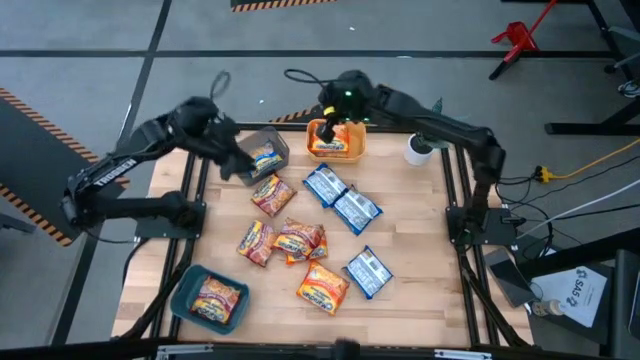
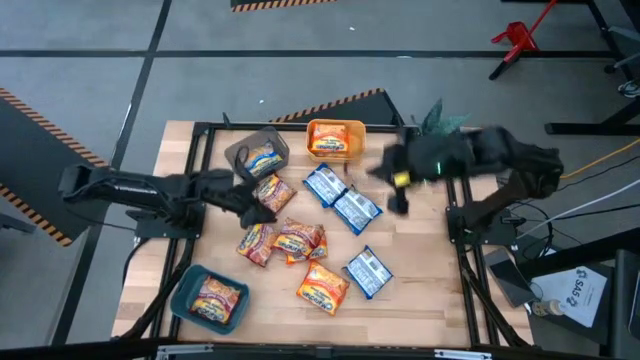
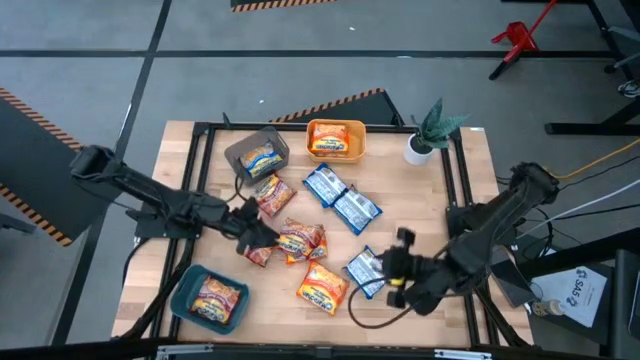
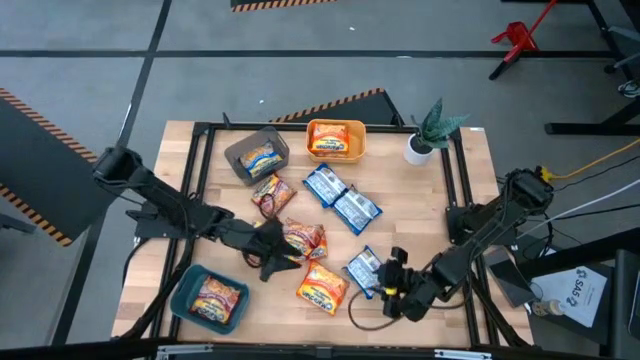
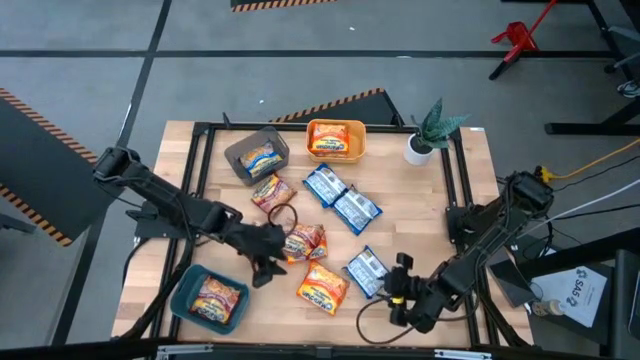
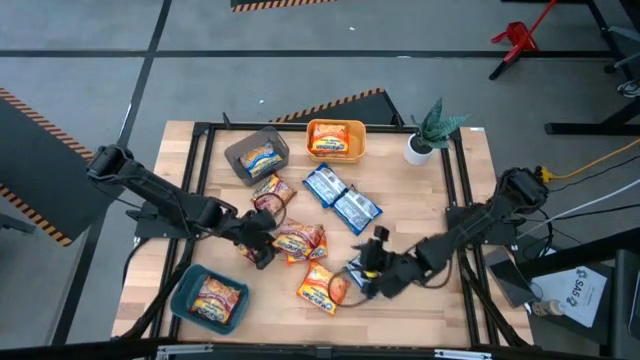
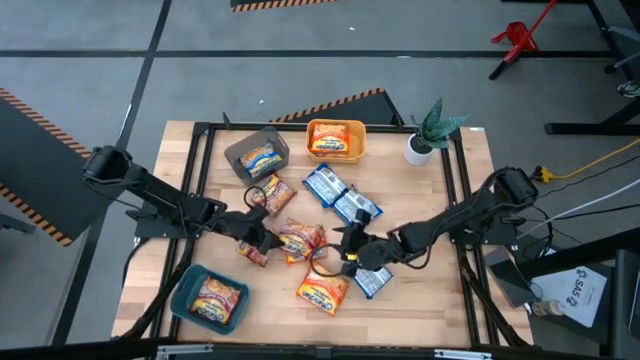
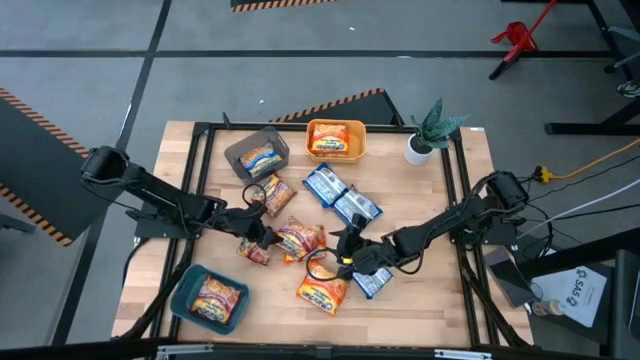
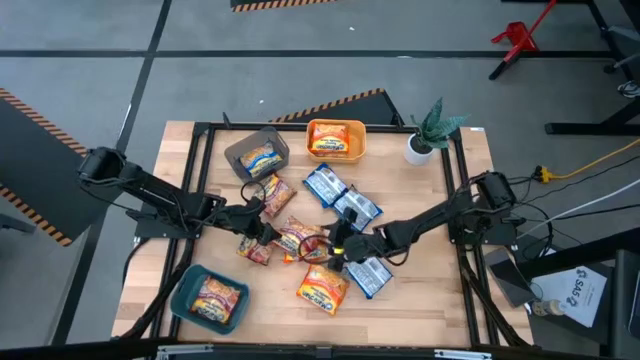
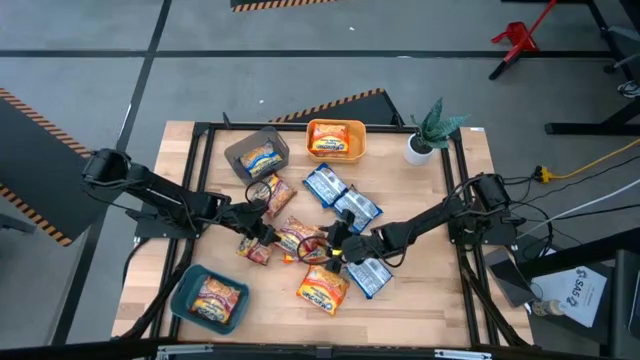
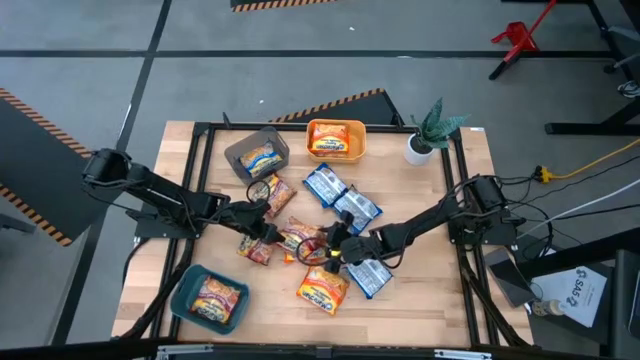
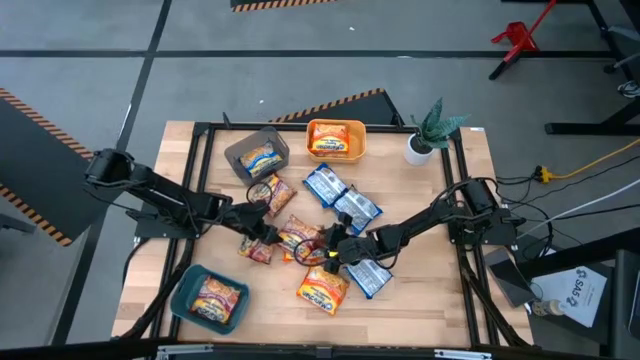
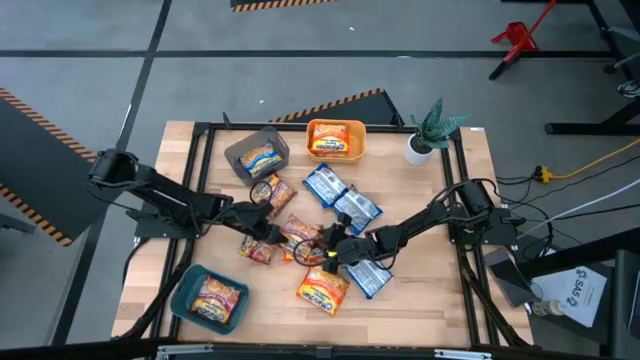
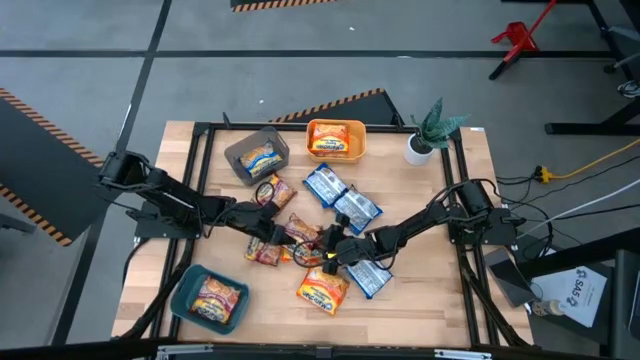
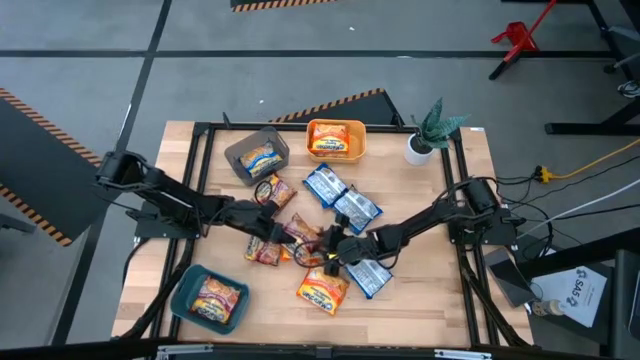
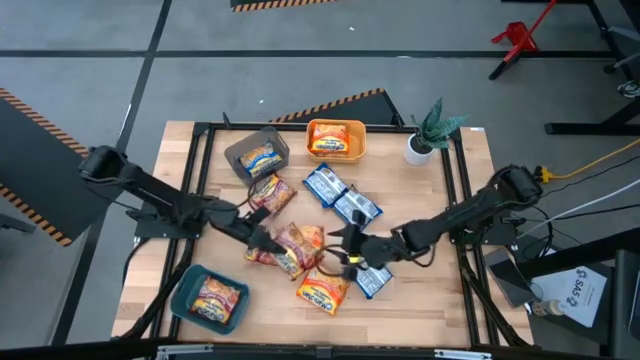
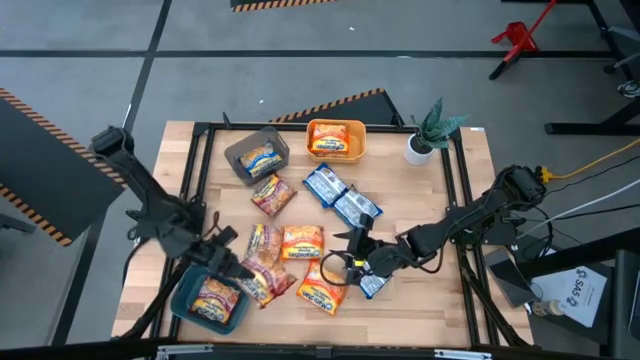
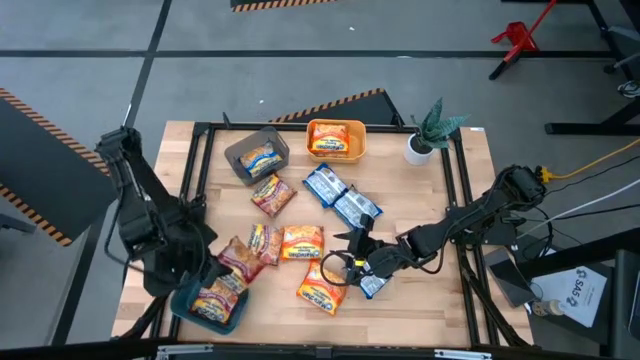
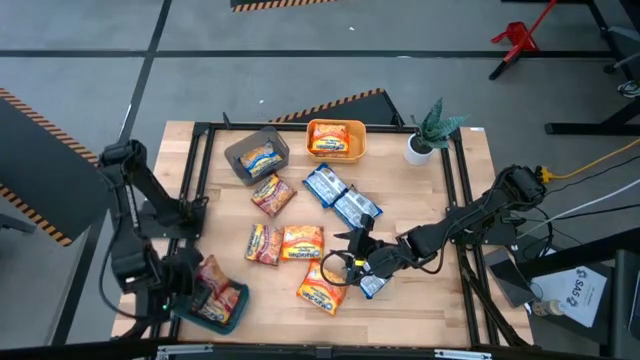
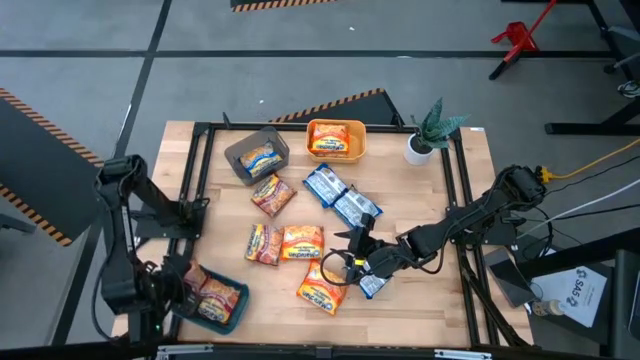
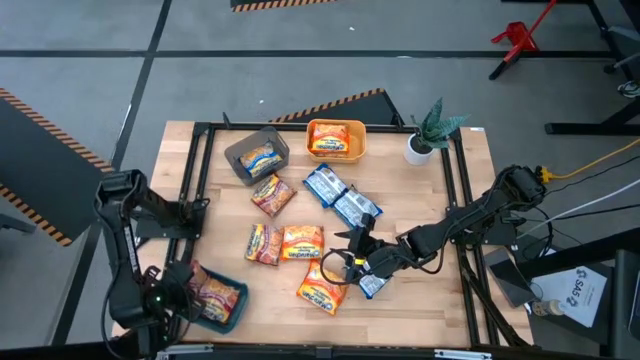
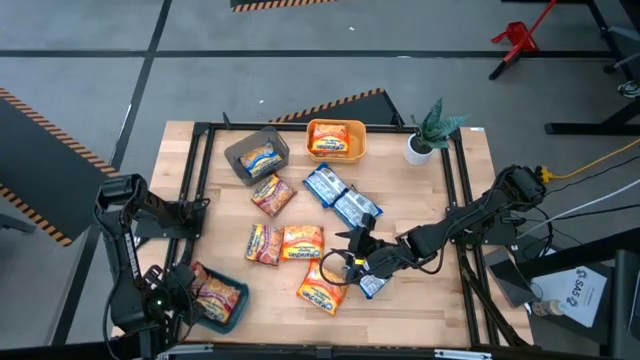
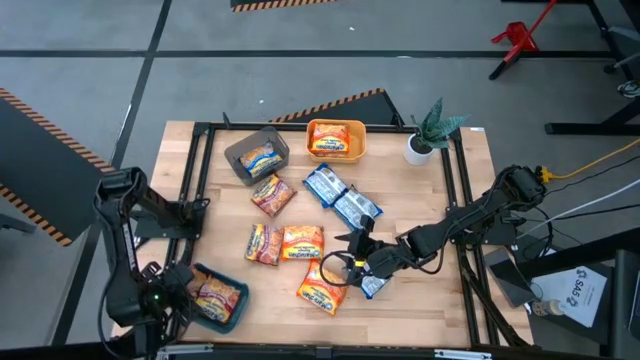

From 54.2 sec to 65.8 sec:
Task: Sort Maruchan noodles
Put the pack of red ramen noodle soup into the teal blue bin

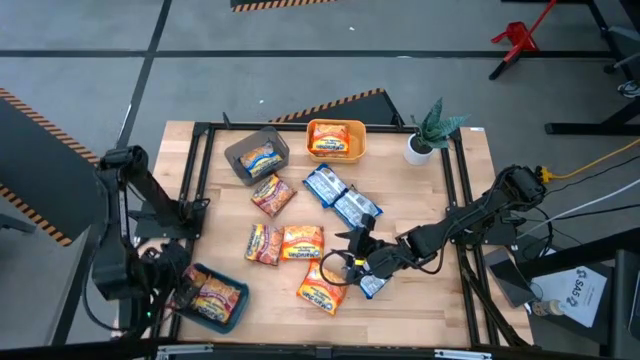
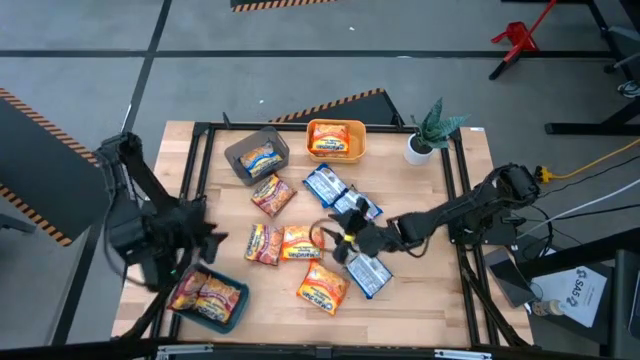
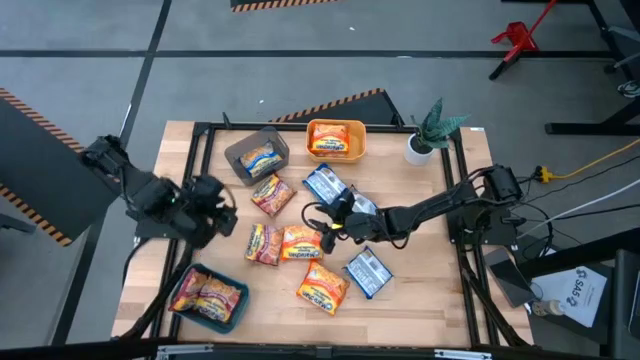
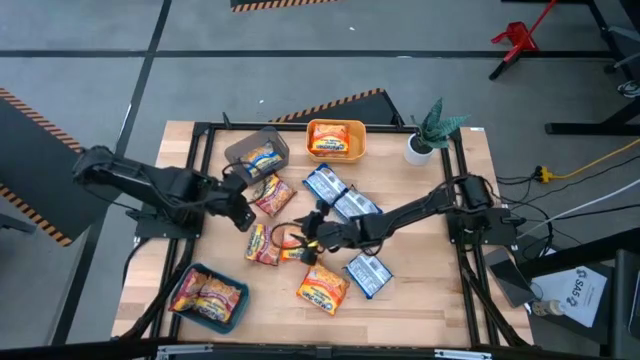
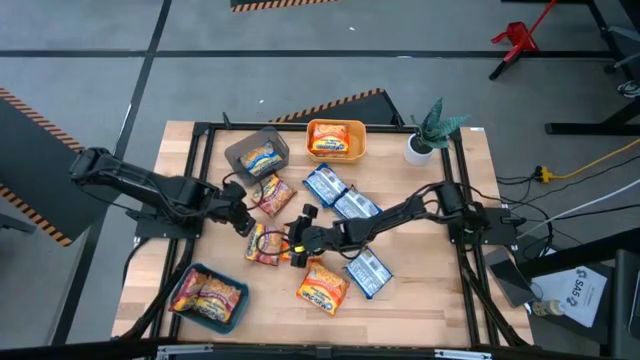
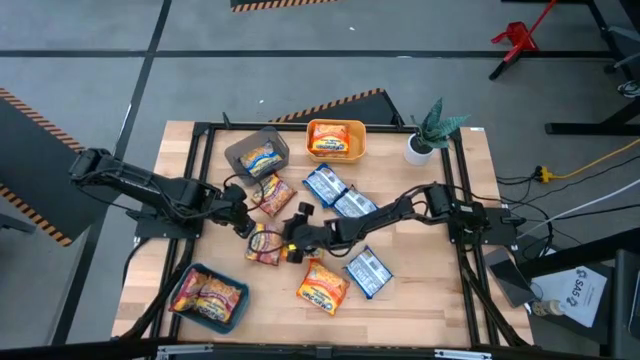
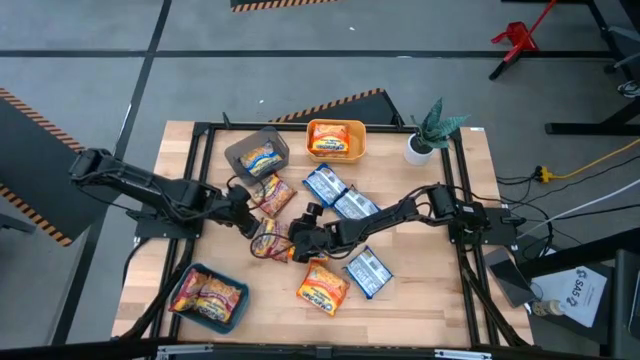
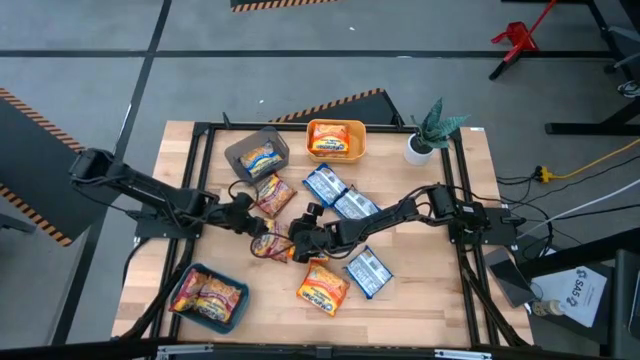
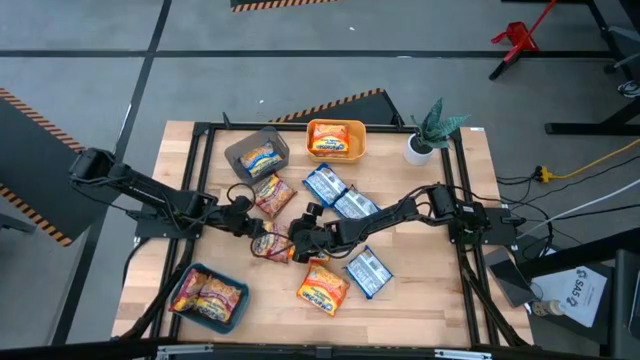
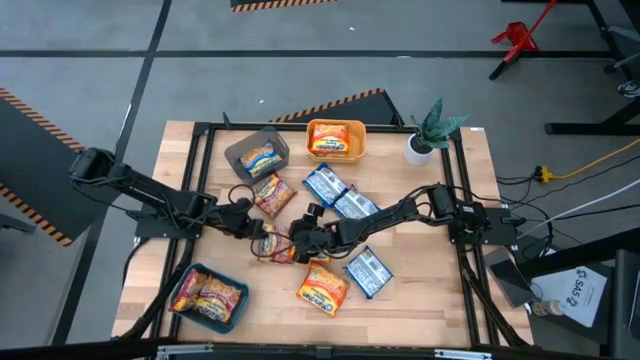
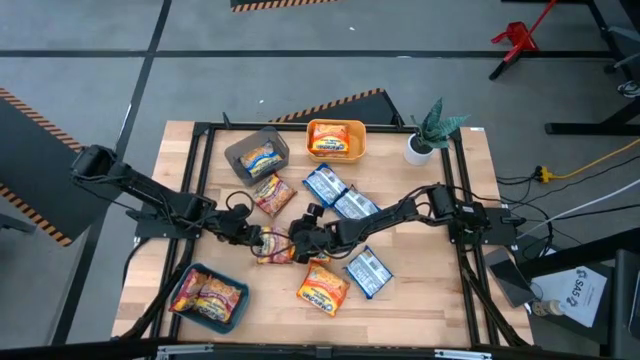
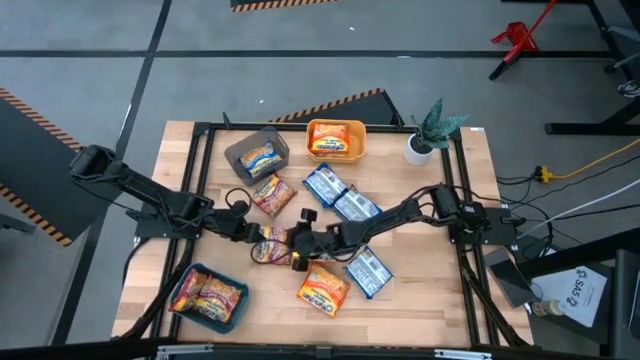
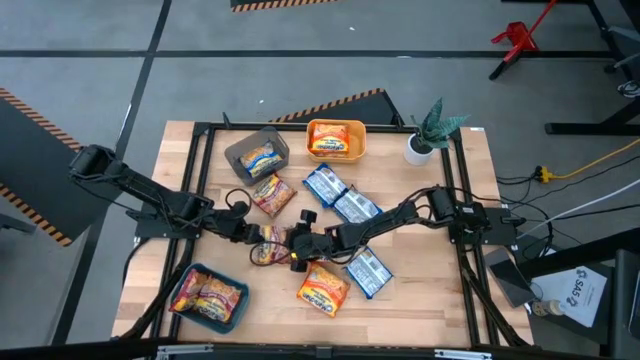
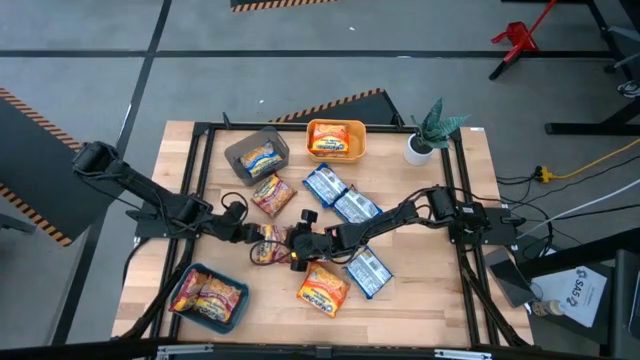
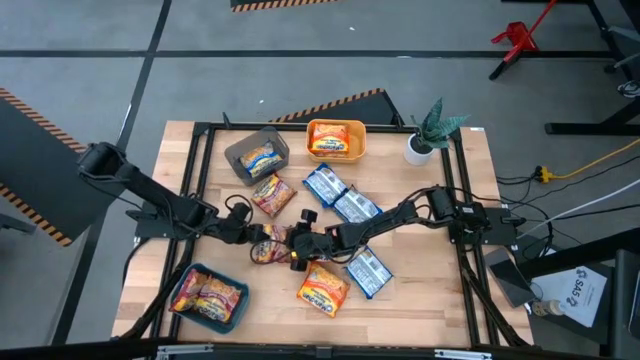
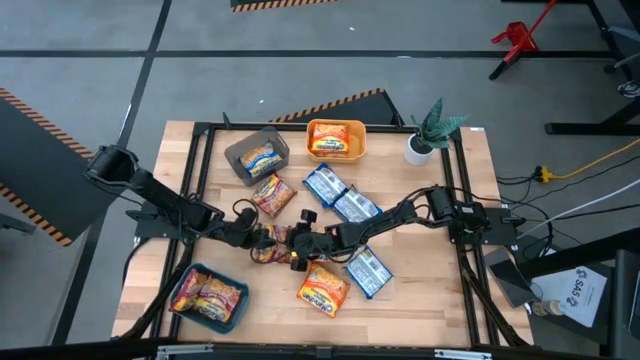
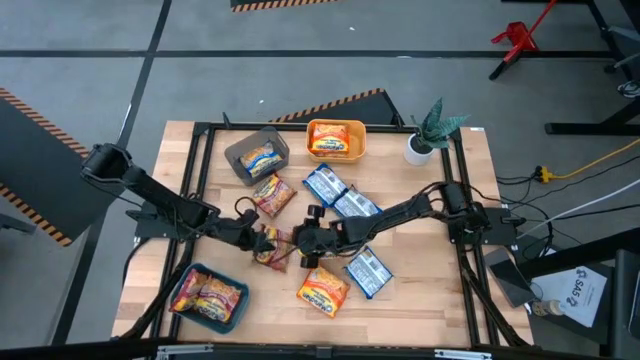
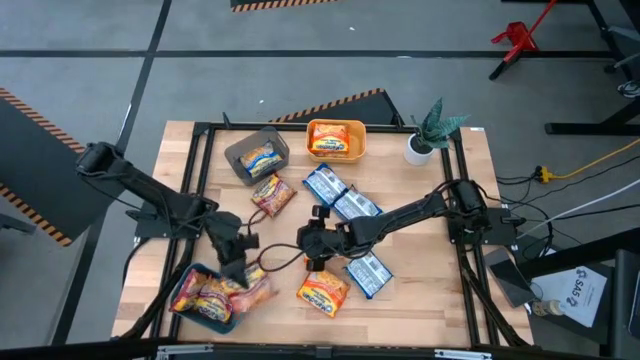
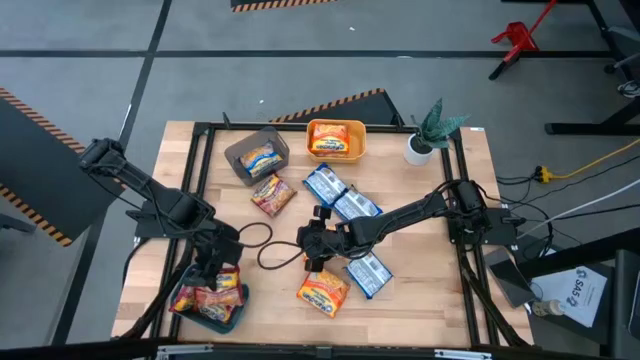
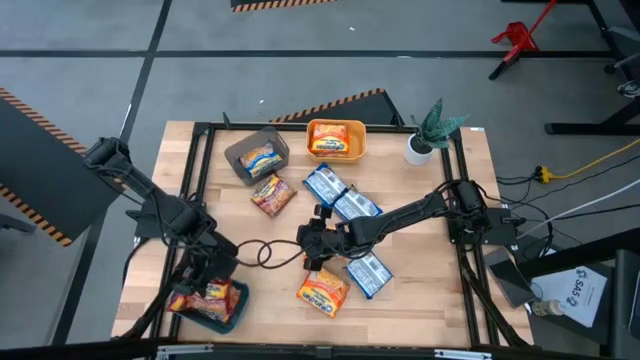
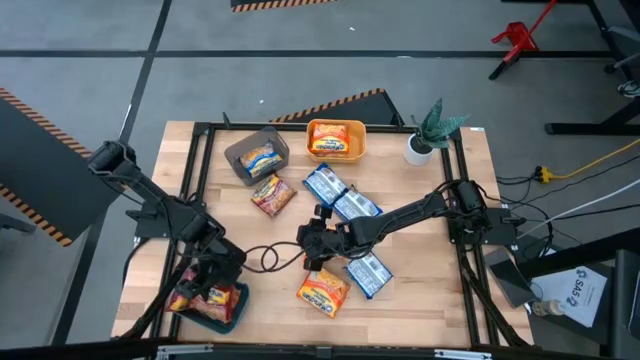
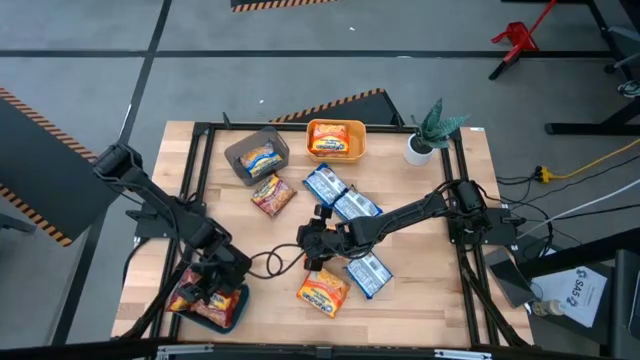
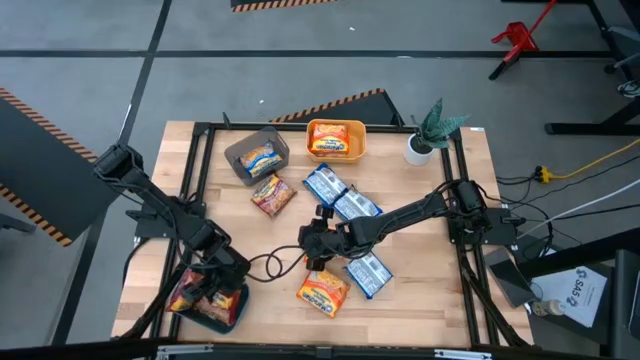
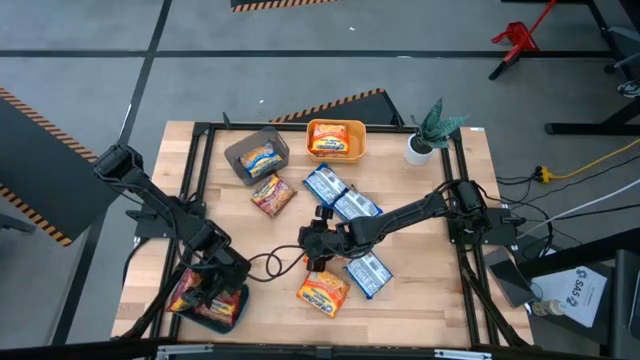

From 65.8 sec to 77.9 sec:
Put the pack of red ramen noodle soup into the teal blue bin
